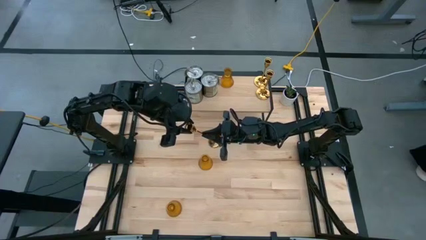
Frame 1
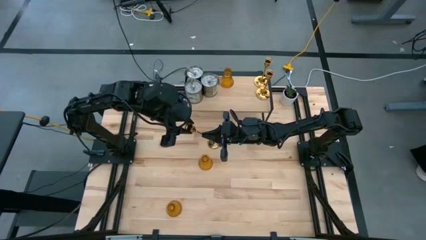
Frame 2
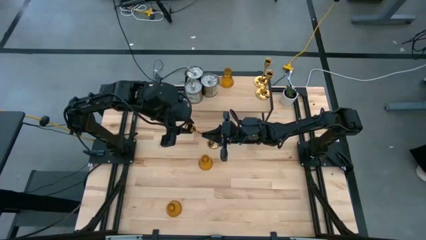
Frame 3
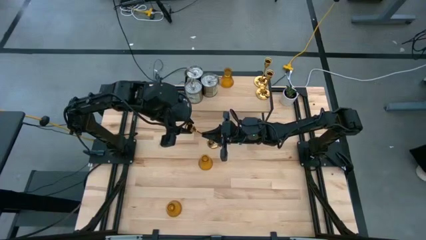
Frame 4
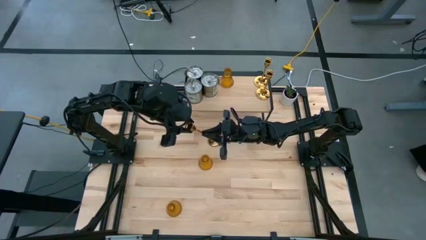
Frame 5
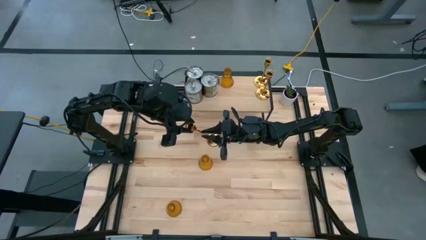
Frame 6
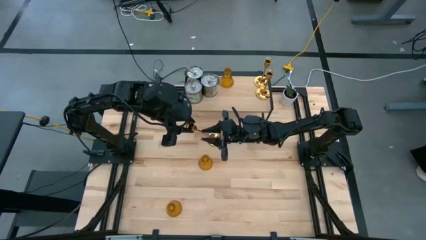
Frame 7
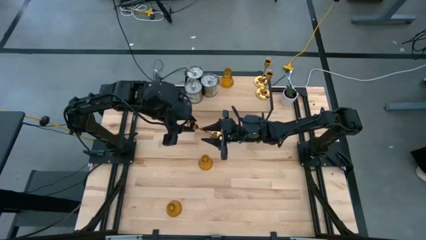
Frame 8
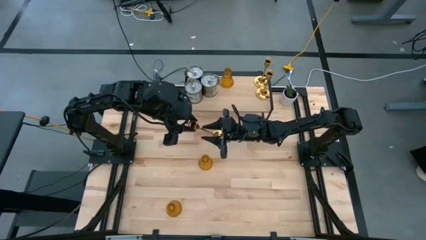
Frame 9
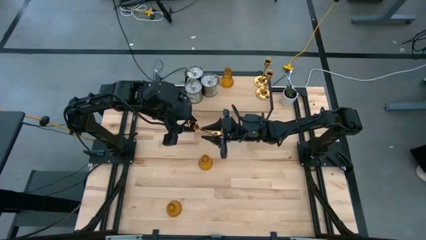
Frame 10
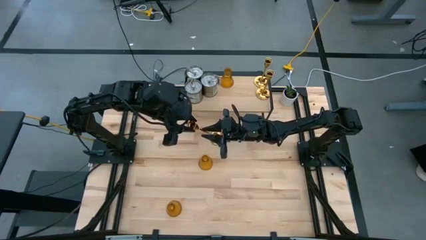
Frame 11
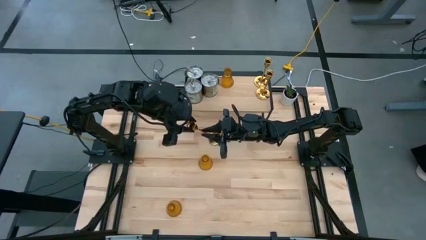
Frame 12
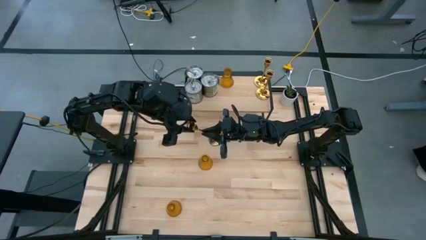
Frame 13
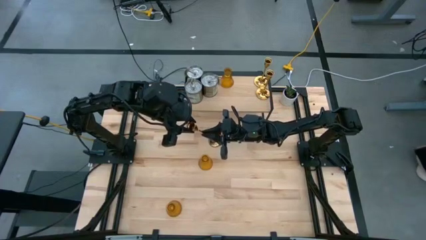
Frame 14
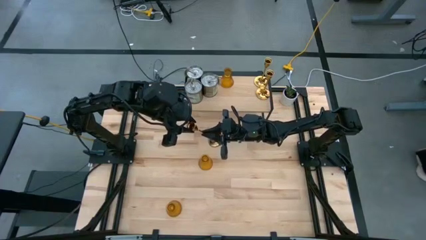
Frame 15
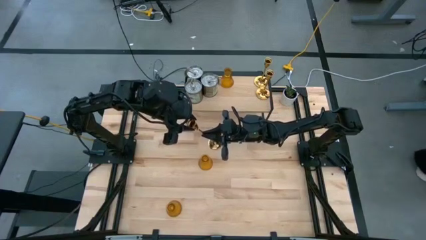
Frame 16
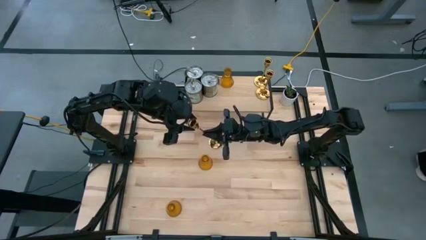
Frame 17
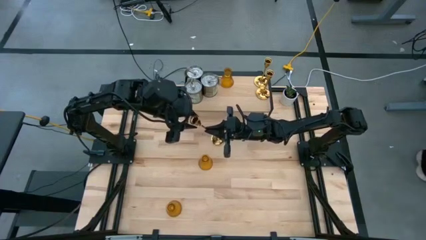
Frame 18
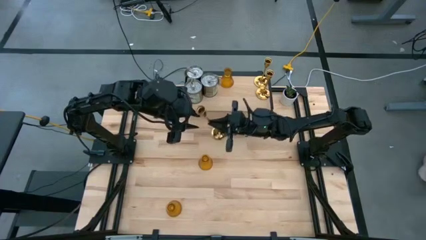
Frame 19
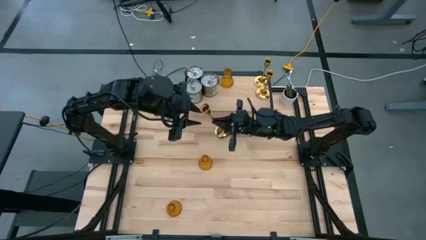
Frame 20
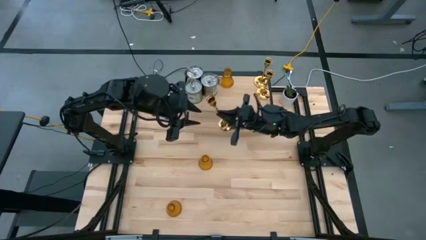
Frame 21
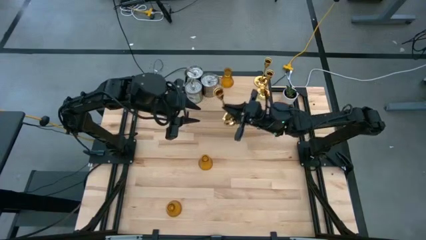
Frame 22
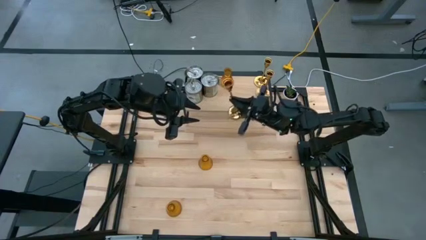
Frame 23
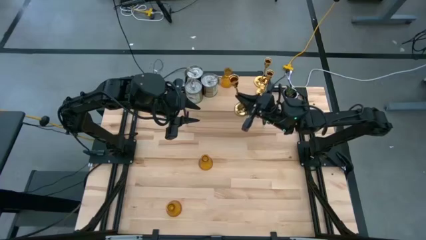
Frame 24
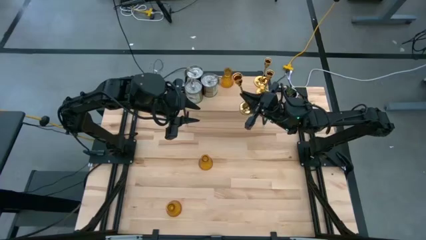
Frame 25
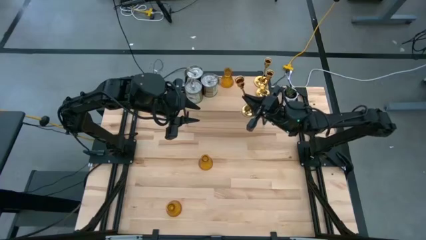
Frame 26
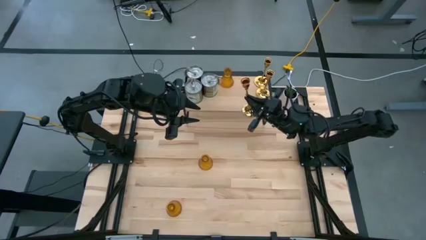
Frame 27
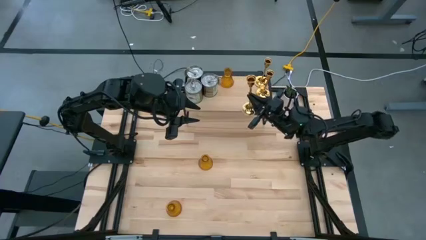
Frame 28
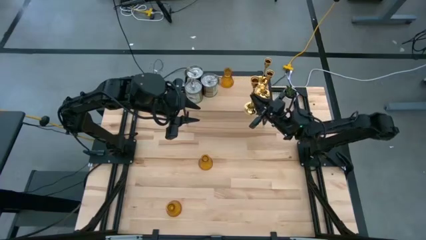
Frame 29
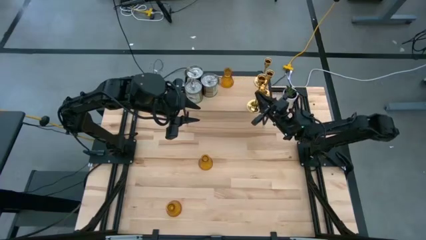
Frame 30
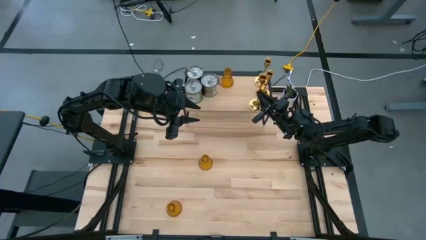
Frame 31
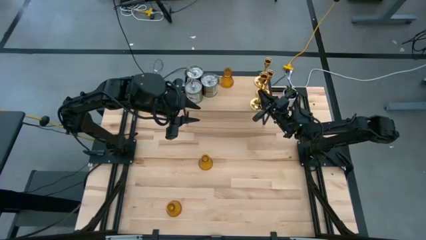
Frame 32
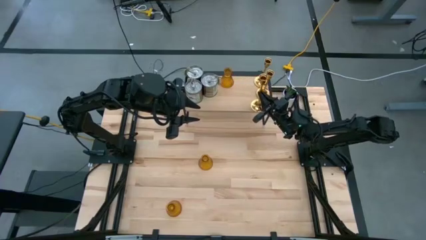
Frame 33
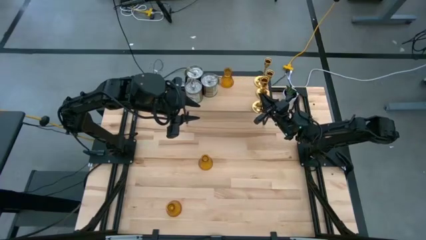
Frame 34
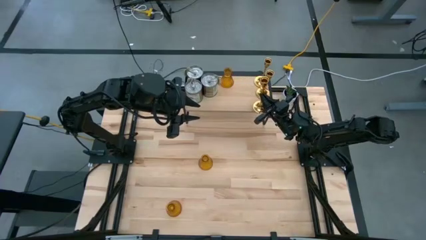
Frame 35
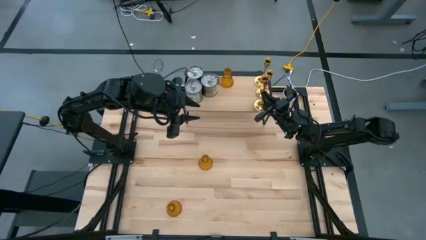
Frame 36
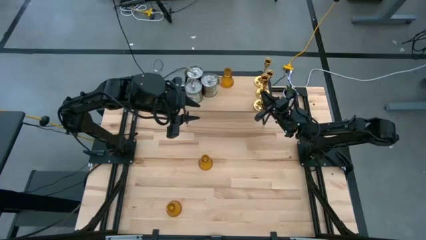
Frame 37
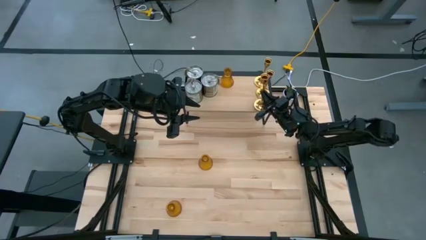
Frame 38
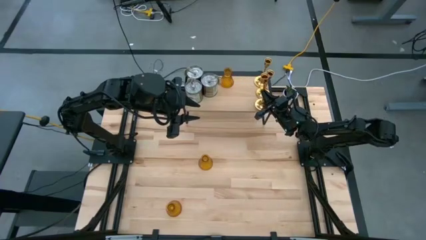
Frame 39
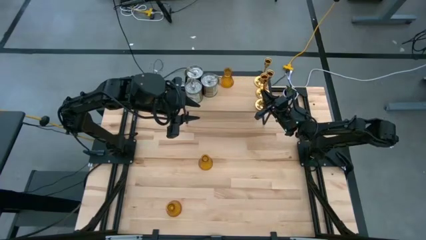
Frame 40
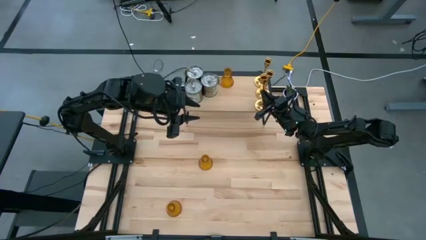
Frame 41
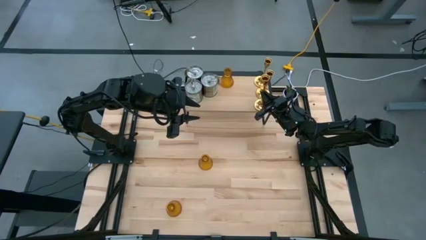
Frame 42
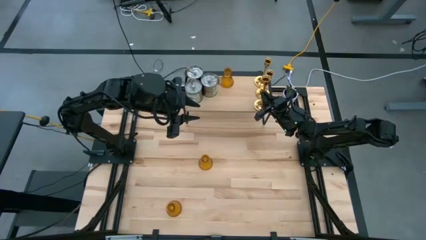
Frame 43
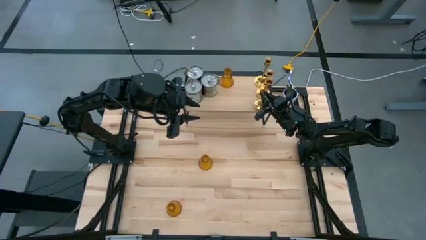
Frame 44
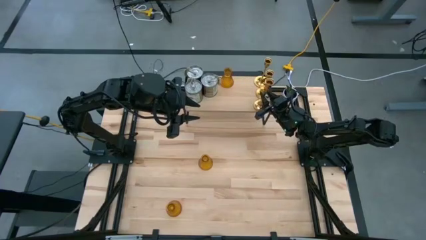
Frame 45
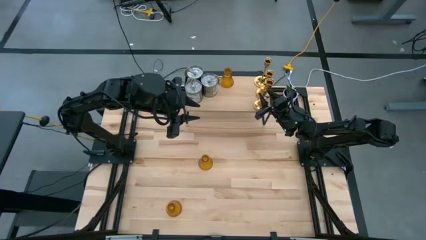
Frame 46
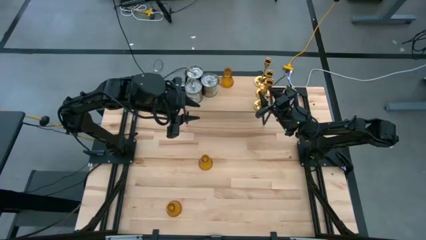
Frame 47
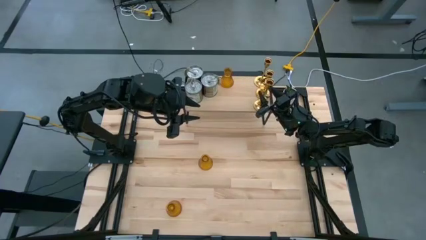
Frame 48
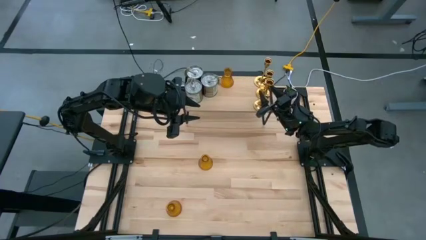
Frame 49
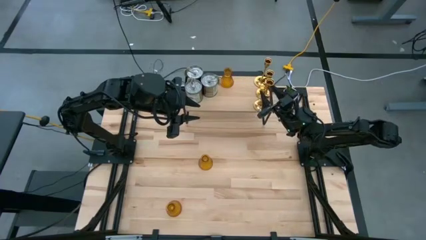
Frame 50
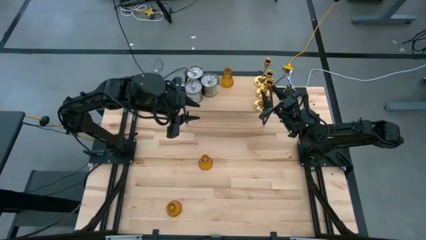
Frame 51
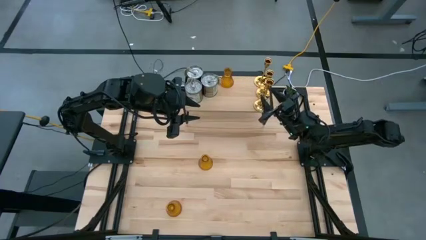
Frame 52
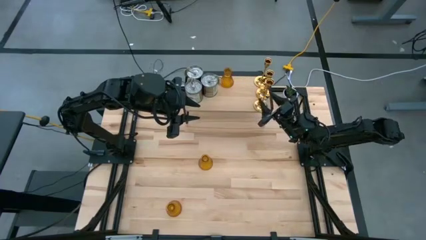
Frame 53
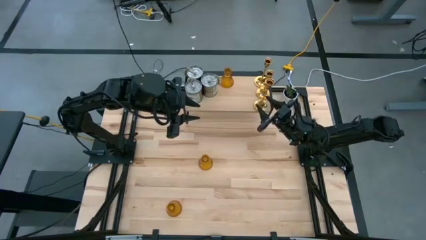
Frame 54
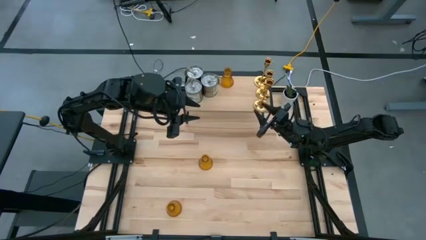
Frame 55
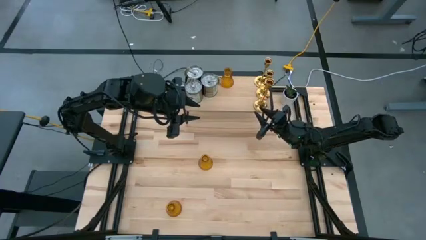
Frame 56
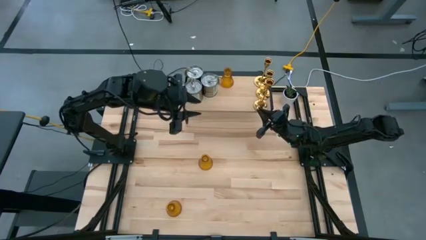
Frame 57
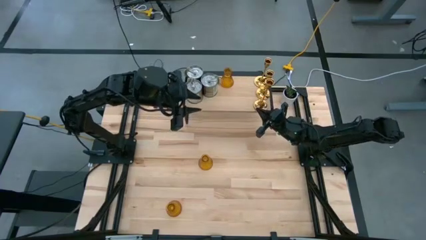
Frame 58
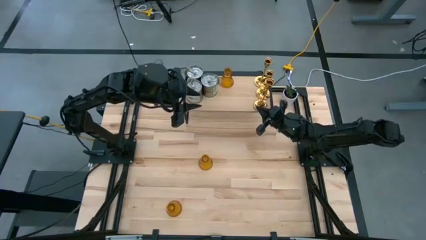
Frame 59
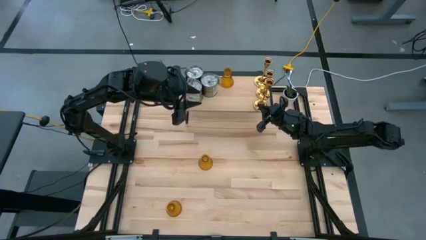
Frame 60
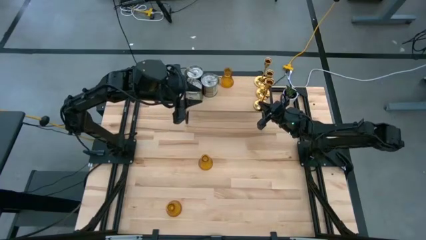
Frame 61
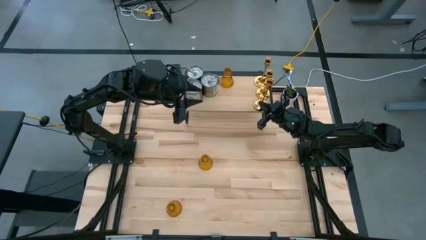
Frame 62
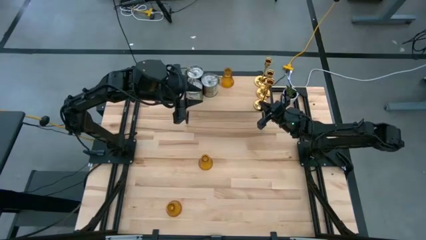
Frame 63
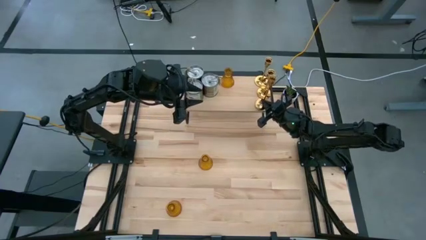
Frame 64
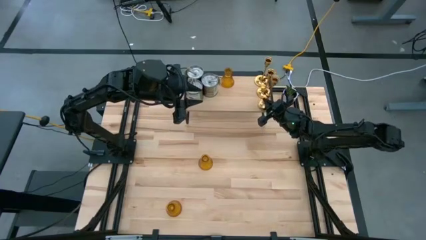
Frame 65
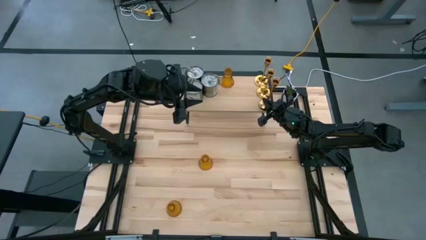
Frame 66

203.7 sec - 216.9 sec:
Task: Pick & Place candle stick holders
Put the gold candle holder on the shelf aligned with the other gold candle holders

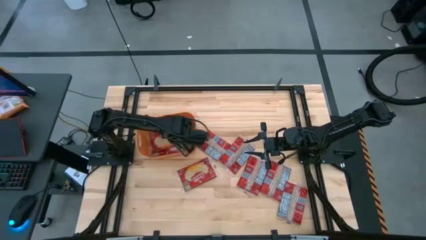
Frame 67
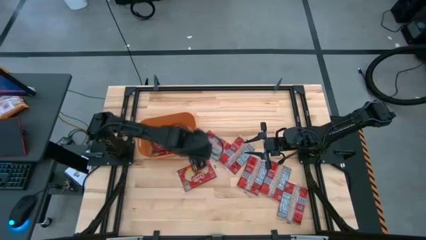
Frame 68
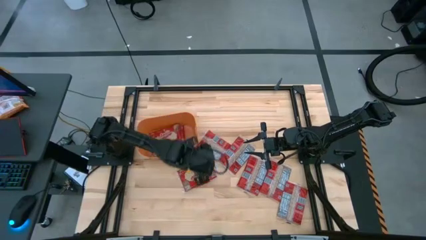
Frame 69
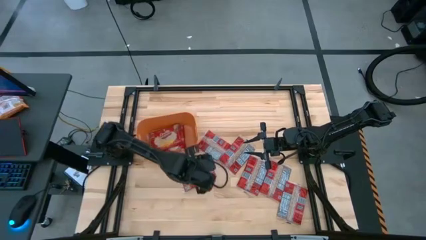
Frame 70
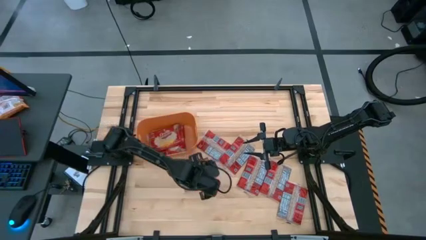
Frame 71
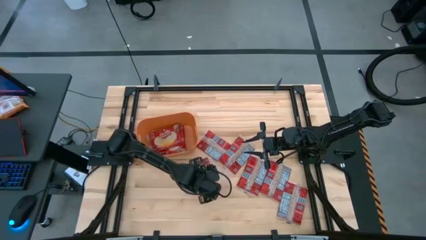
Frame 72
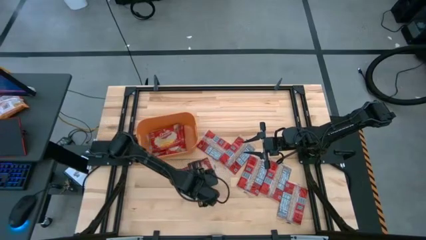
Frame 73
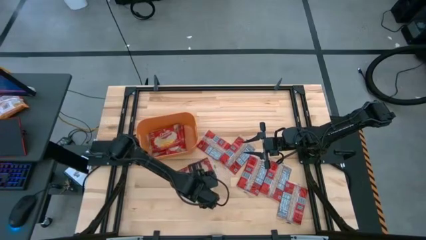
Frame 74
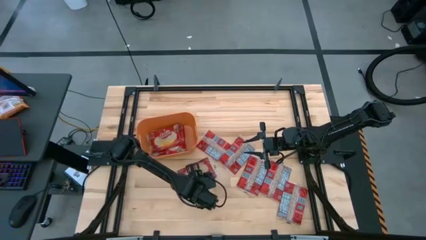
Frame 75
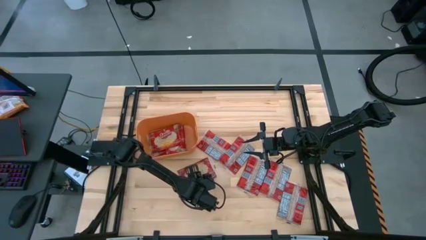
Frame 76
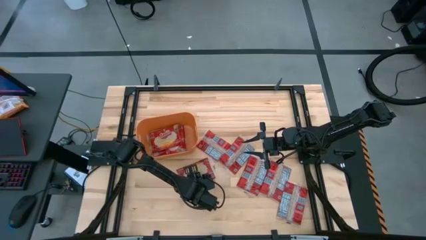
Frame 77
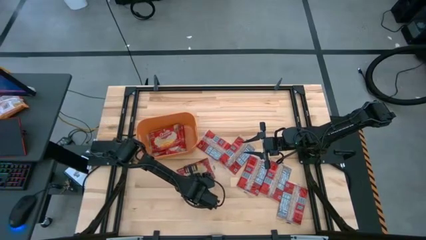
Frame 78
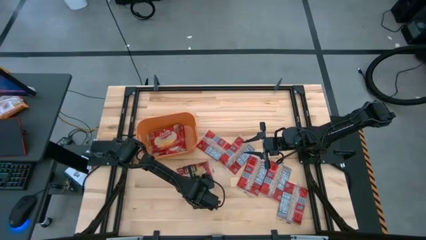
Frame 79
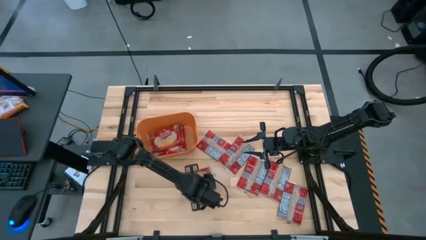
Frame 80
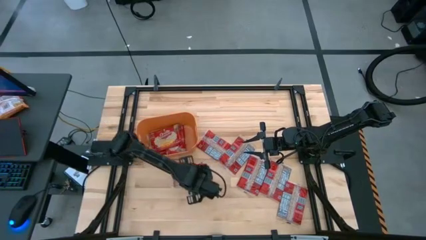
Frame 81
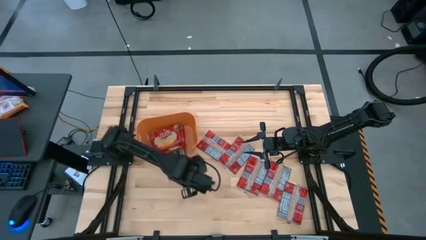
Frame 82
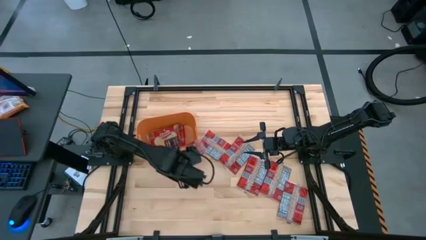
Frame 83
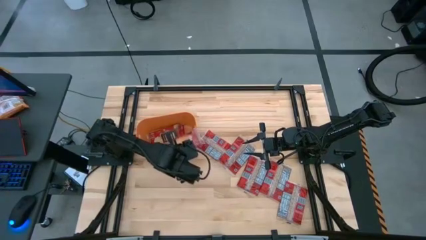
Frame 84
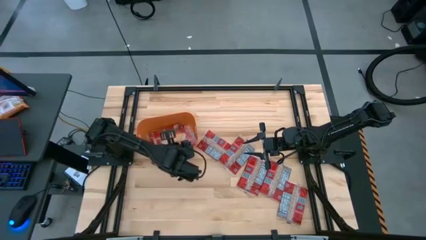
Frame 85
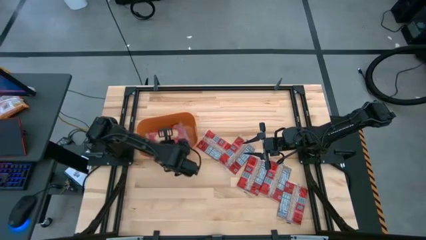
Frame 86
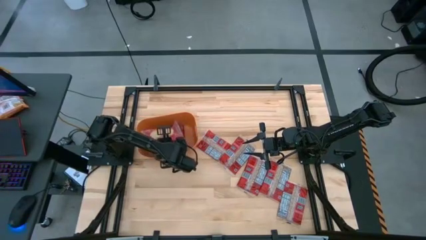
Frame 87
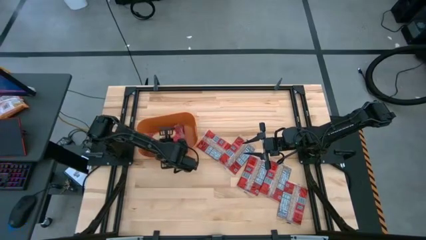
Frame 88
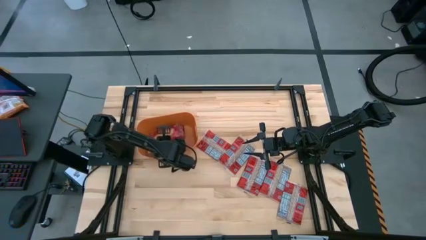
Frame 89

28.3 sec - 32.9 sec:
Task: Sort popcorn bags into baskets
Put the red popcorn bag into the orange bin
